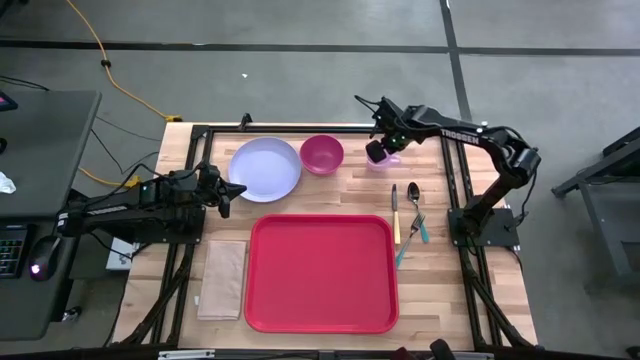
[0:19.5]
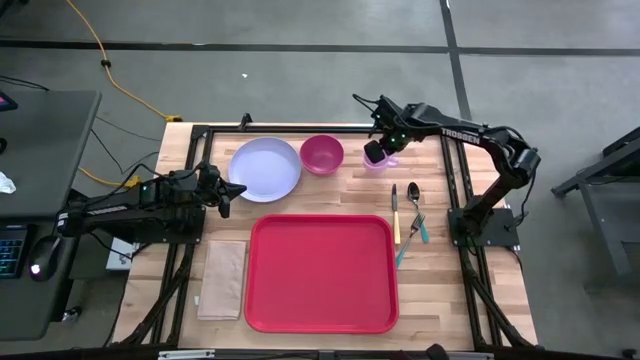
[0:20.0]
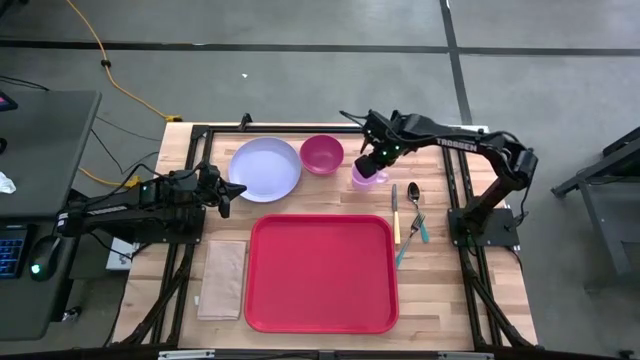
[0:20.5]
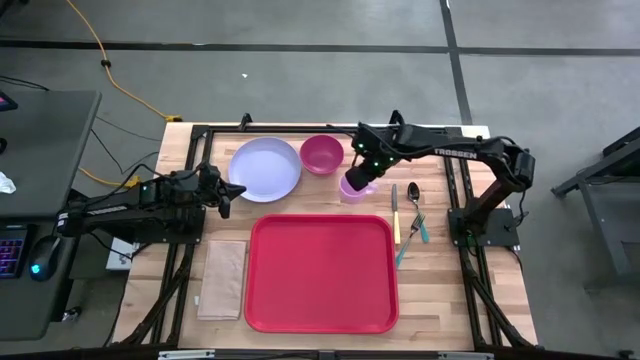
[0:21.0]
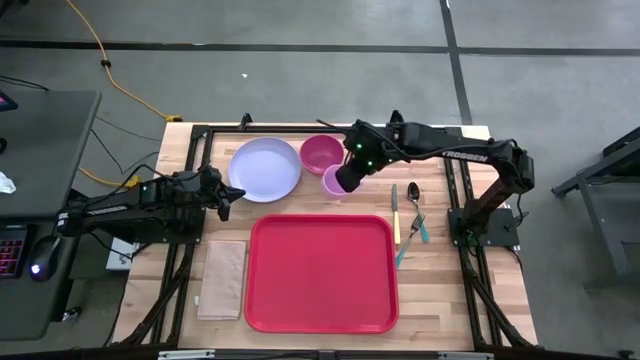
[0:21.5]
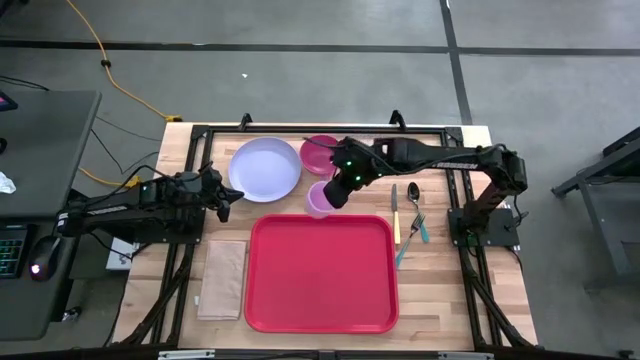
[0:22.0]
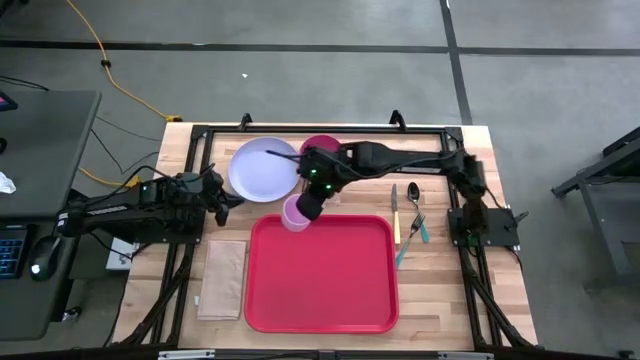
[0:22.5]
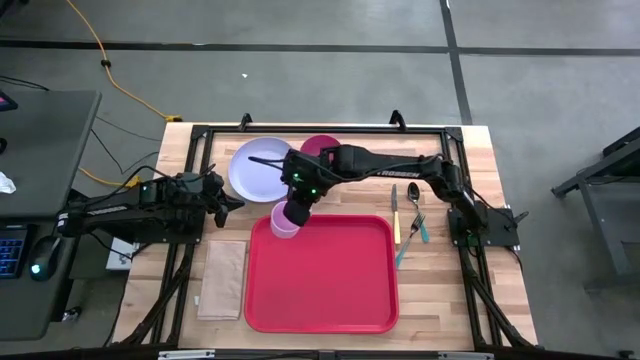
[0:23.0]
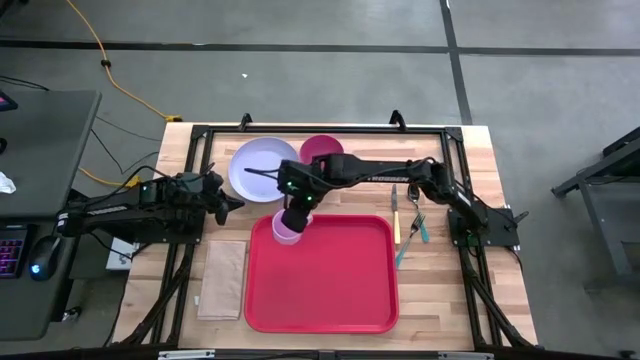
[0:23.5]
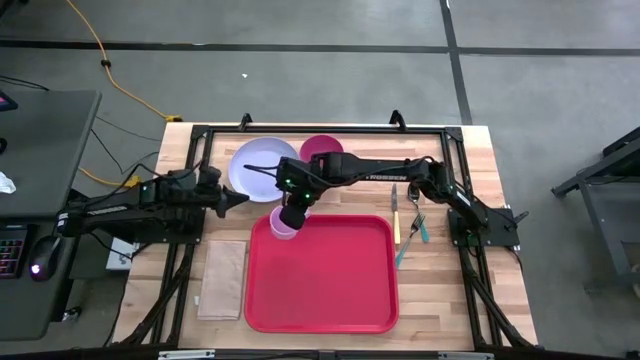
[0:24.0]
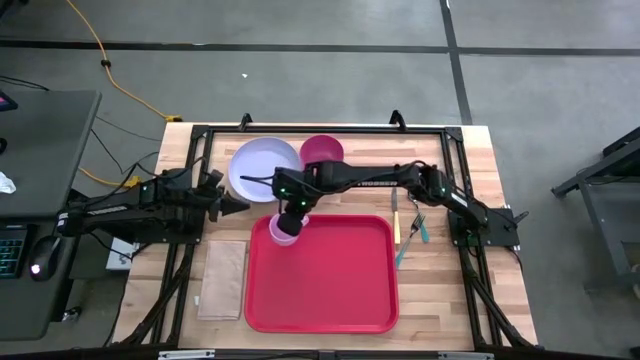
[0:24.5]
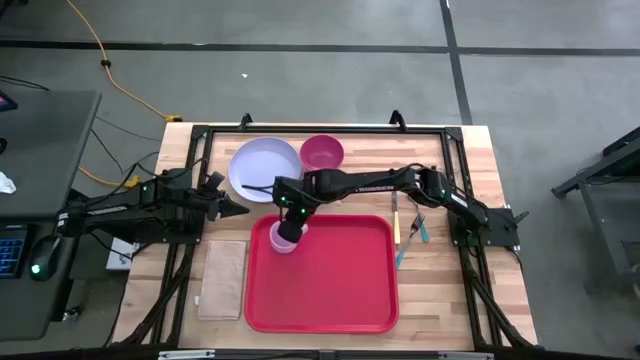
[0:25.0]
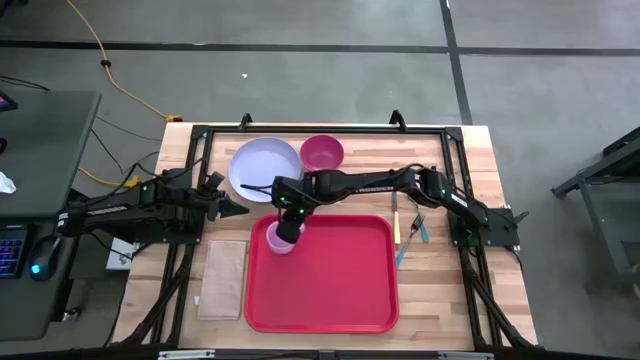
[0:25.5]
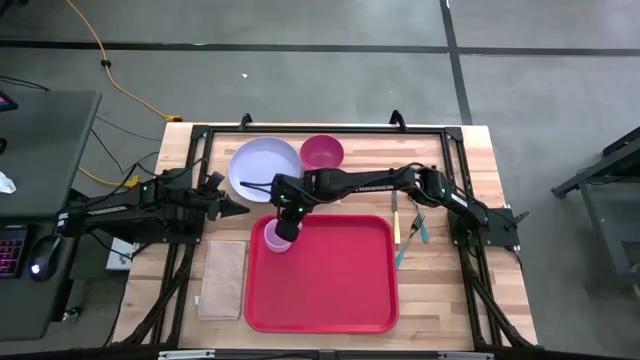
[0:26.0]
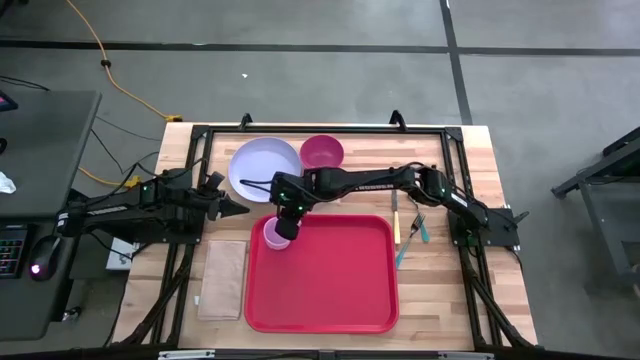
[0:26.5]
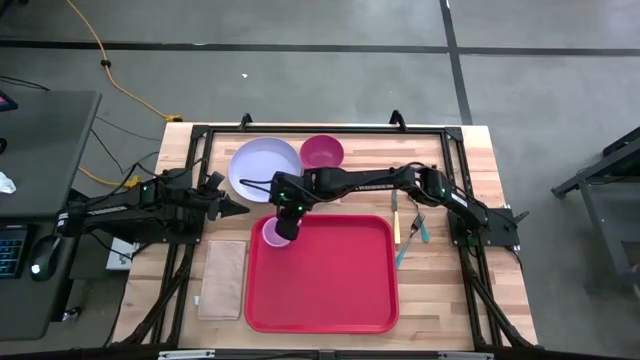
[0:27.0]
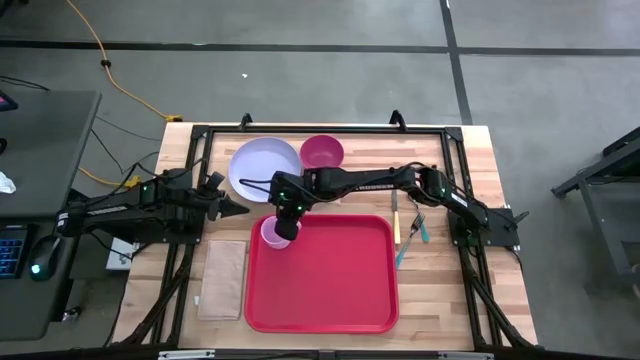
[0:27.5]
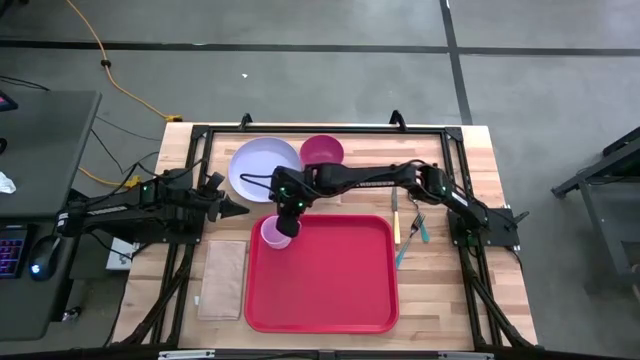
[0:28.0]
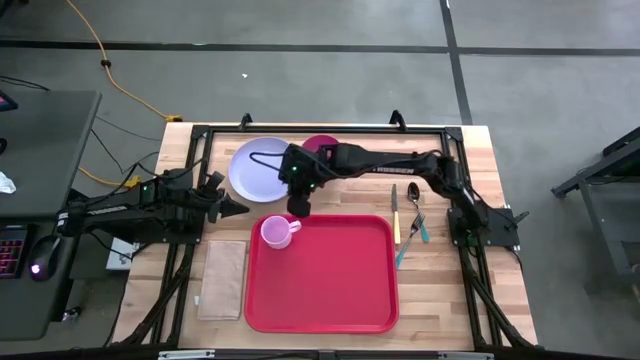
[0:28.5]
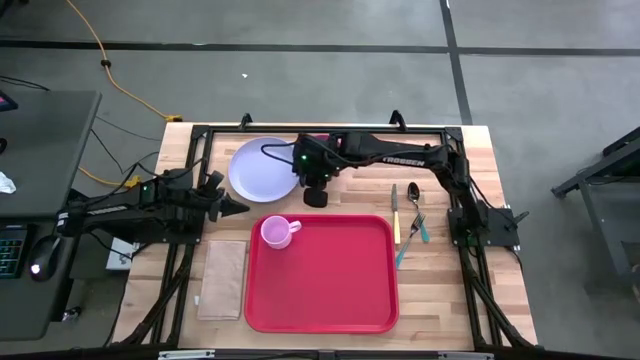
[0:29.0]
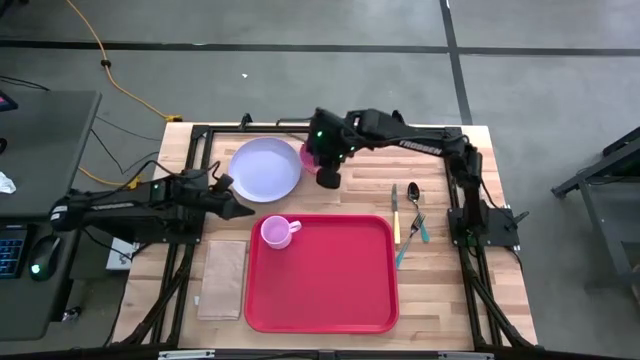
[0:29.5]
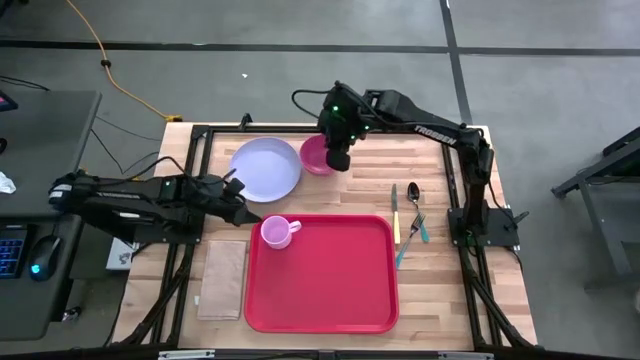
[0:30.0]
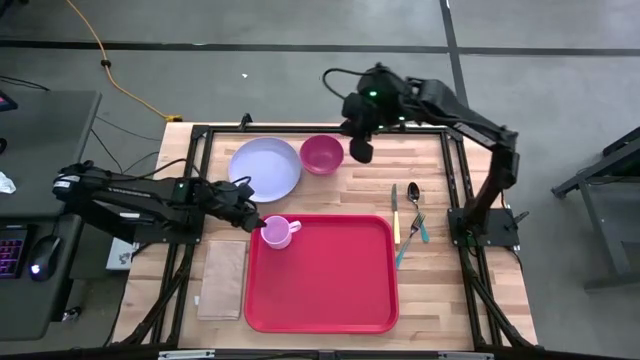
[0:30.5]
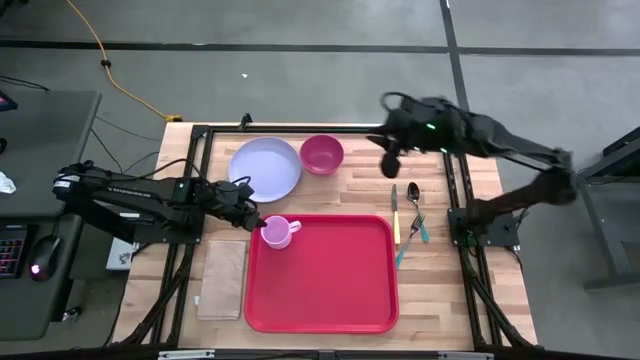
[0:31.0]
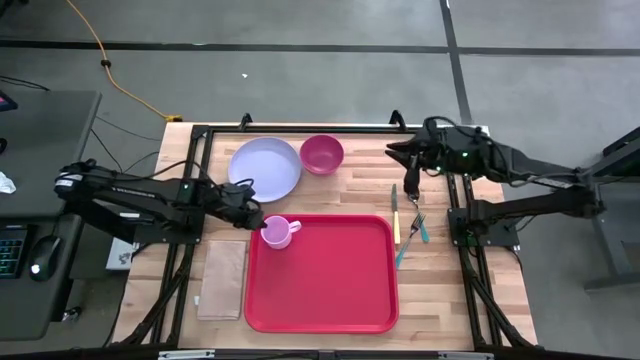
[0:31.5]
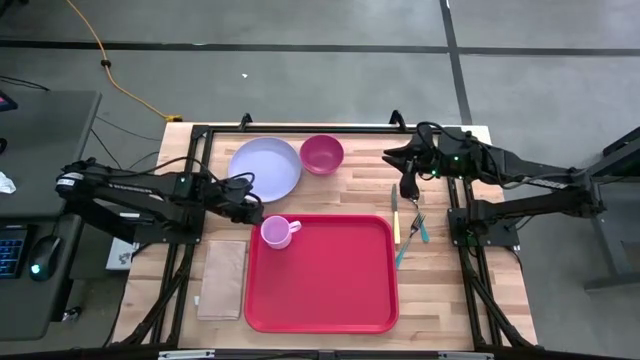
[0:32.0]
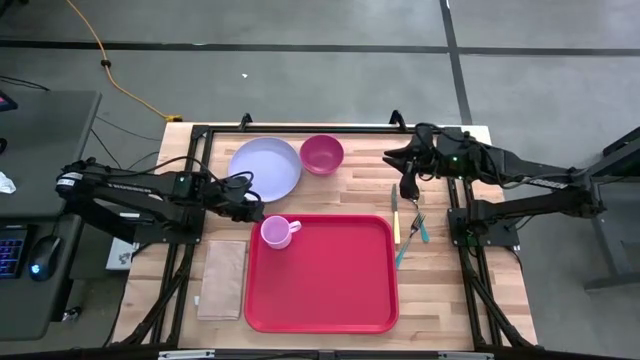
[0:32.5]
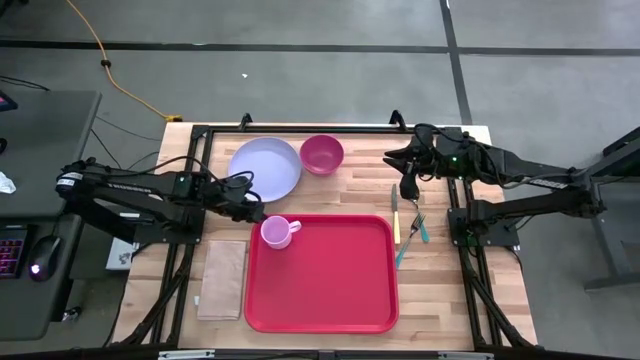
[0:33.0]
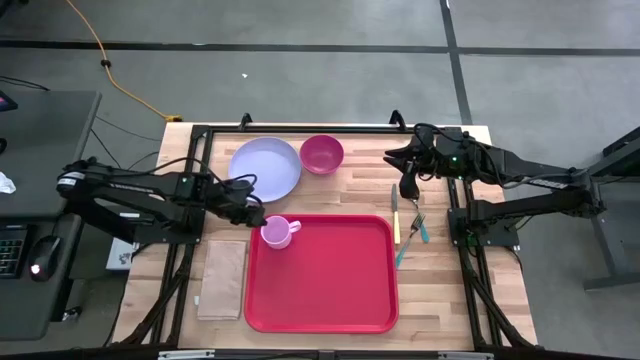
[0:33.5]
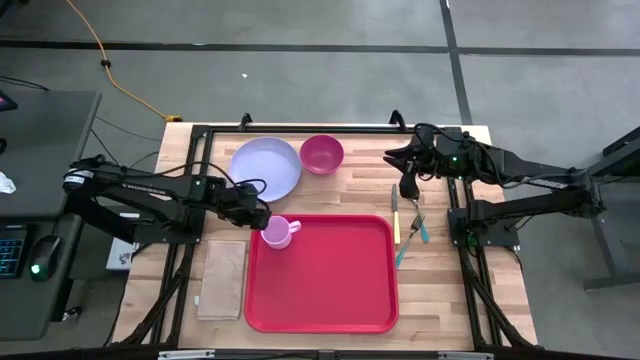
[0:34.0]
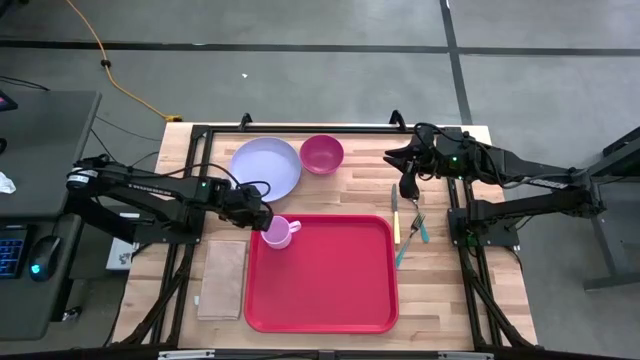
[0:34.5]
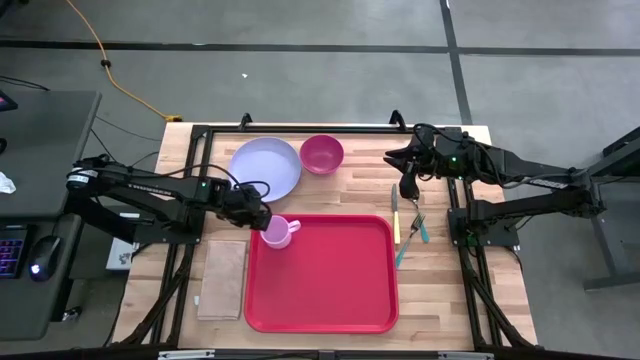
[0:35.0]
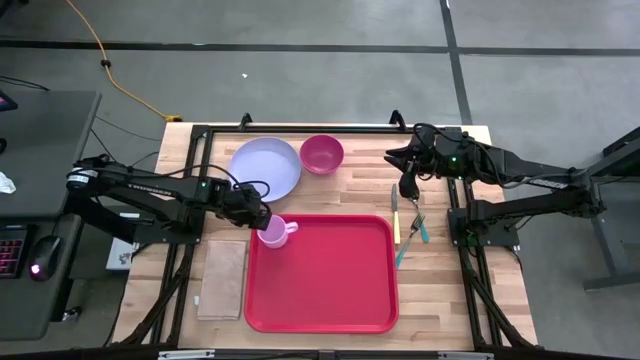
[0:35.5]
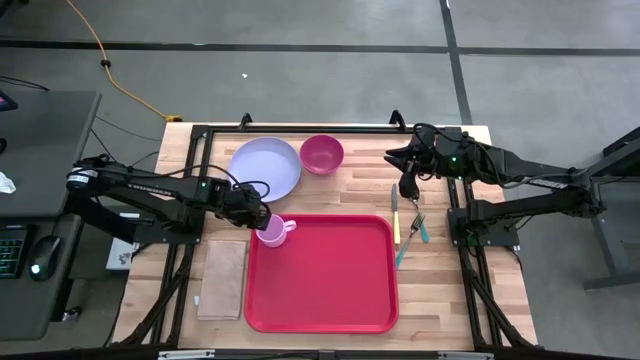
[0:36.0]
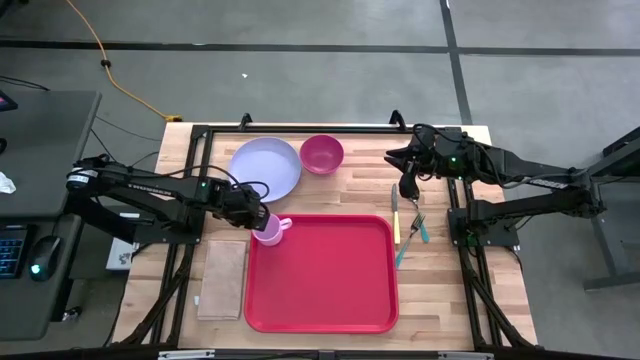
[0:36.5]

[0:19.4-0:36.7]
Task: Set up tray
Put the pink mug on the red serving tray

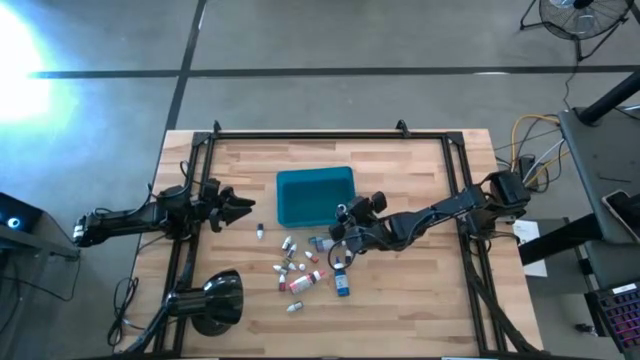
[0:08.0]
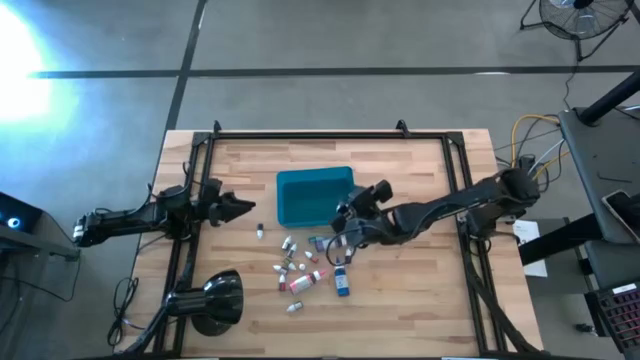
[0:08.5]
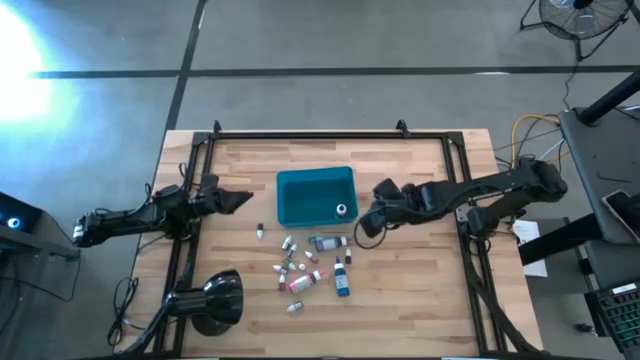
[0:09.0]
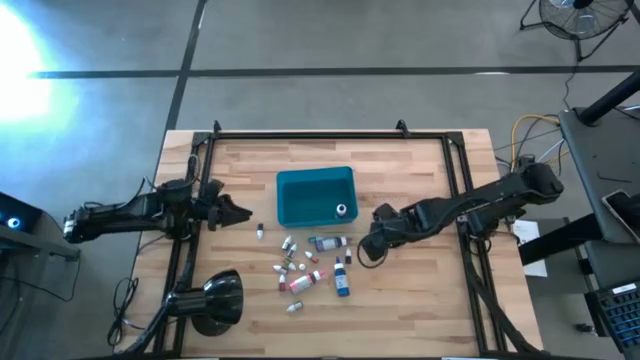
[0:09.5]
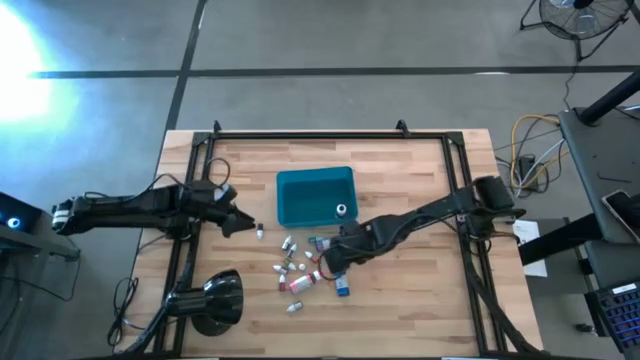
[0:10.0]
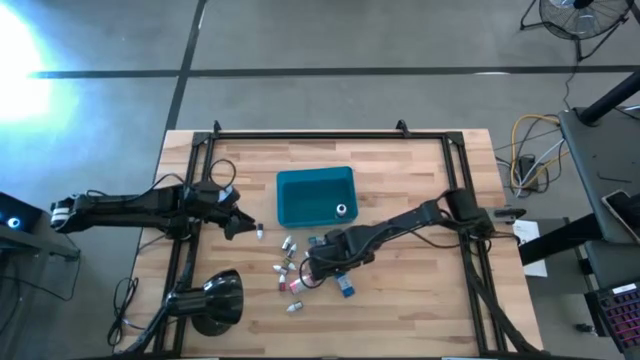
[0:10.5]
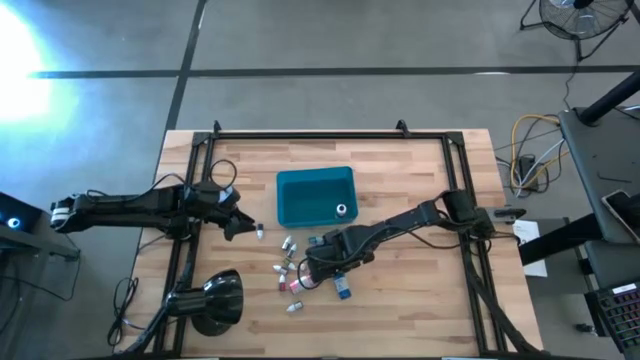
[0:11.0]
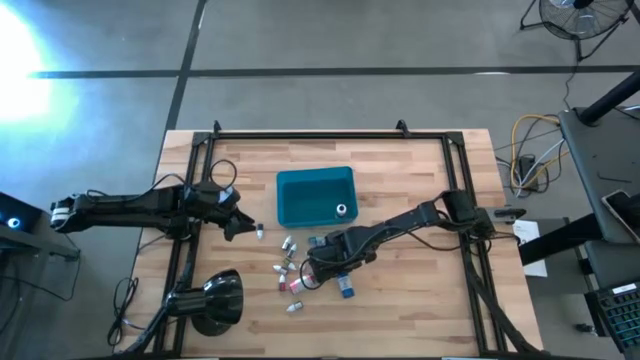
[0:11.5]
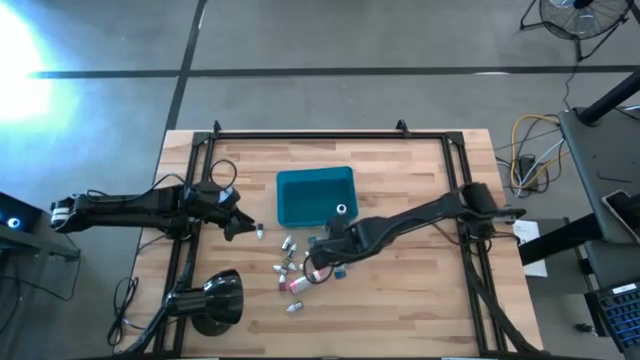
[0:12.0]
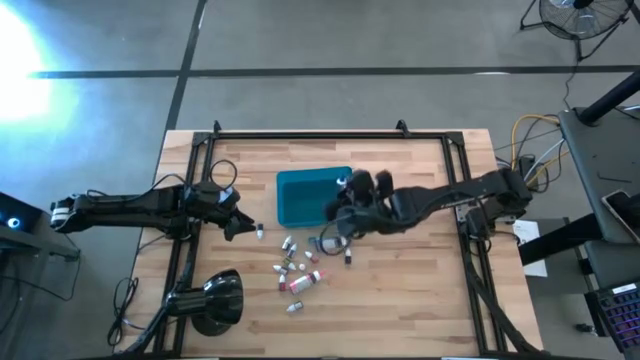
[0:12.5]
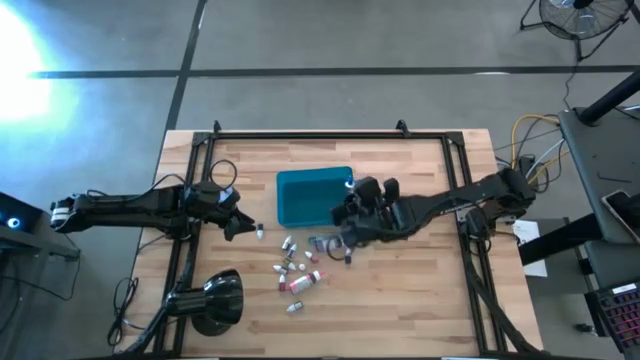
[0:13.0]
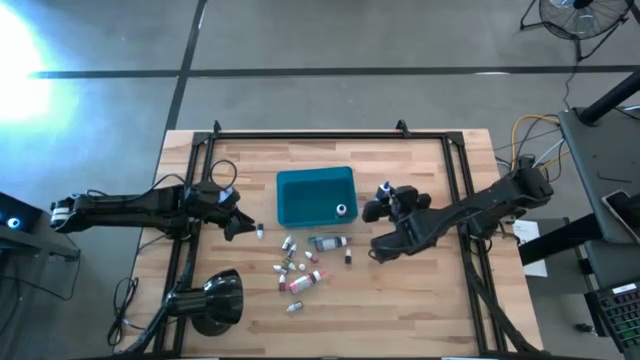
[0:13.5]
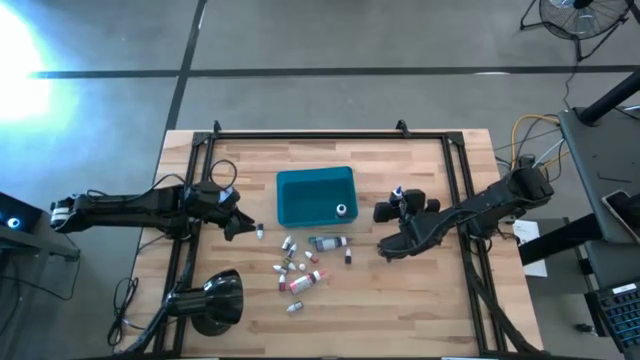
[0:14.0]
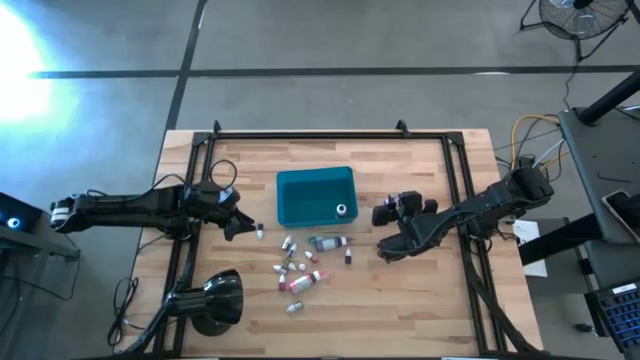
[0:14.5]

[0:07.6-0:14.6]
Task: Pick & Place food coloring
Put the large blue food coloring bottle to the right of the blue bin
